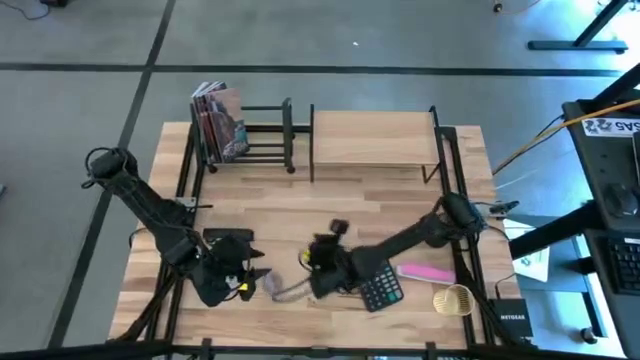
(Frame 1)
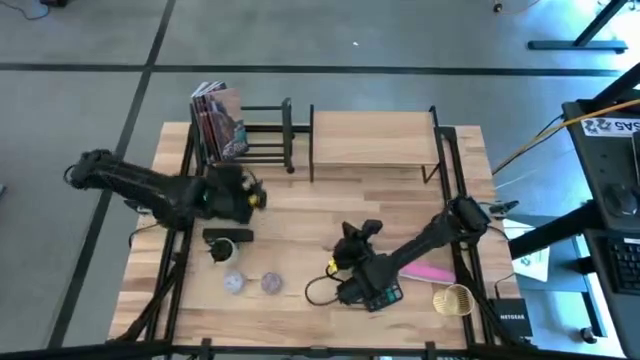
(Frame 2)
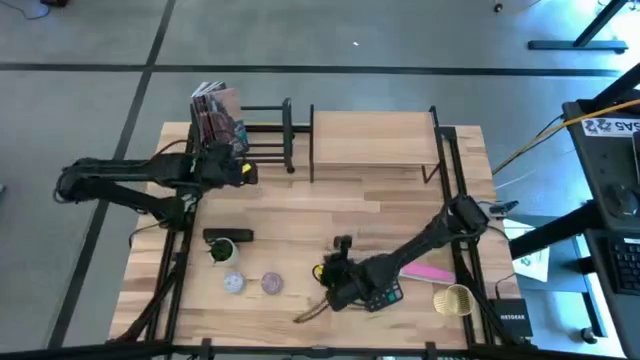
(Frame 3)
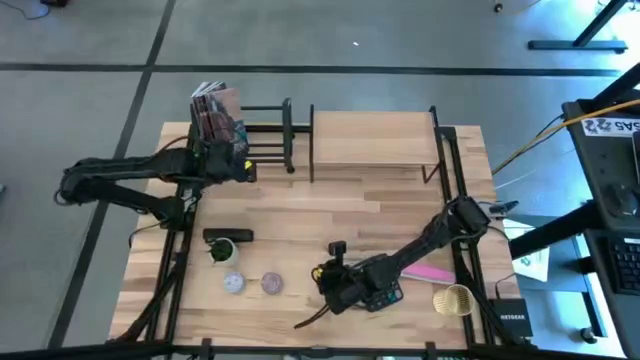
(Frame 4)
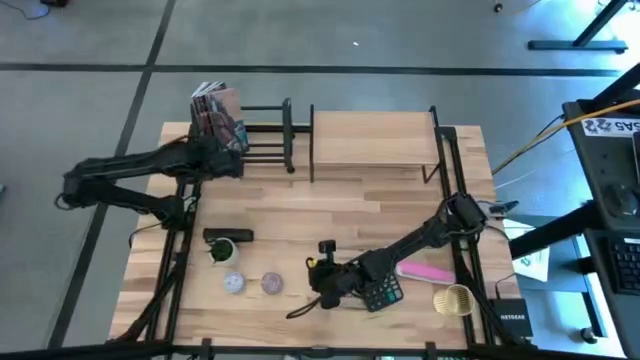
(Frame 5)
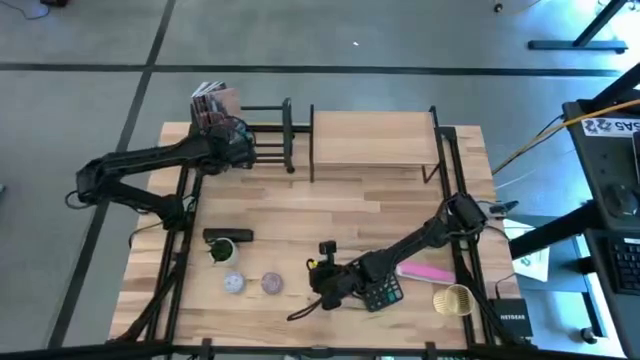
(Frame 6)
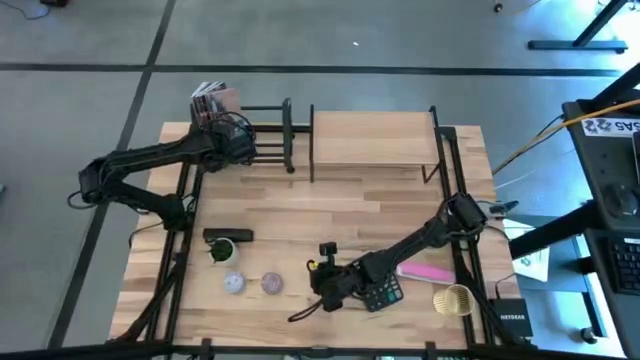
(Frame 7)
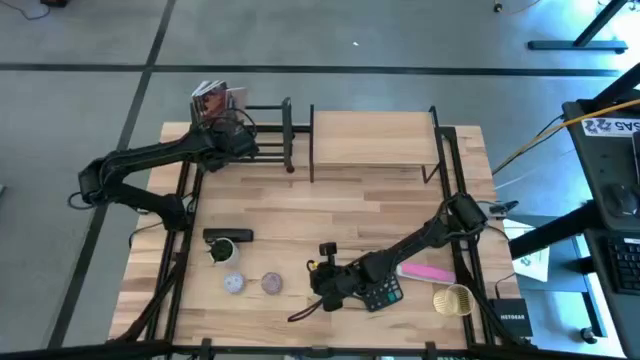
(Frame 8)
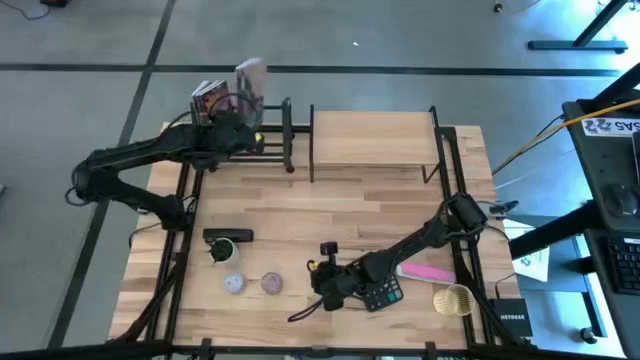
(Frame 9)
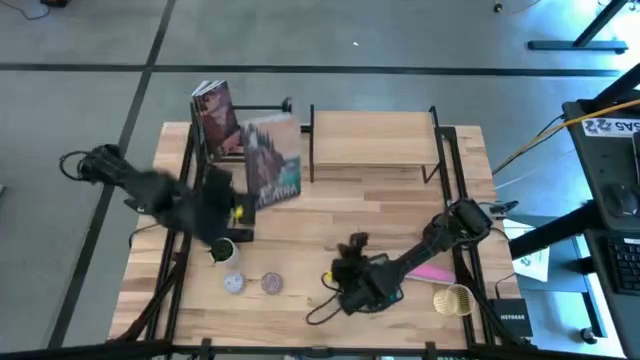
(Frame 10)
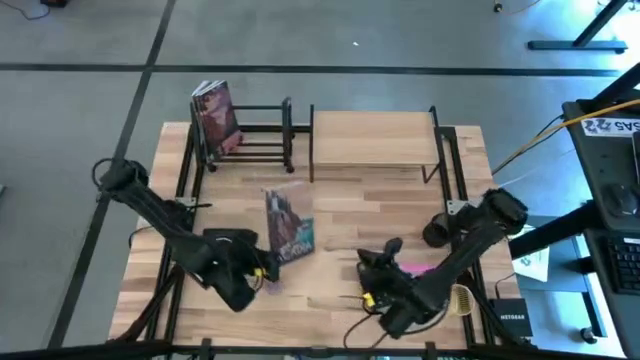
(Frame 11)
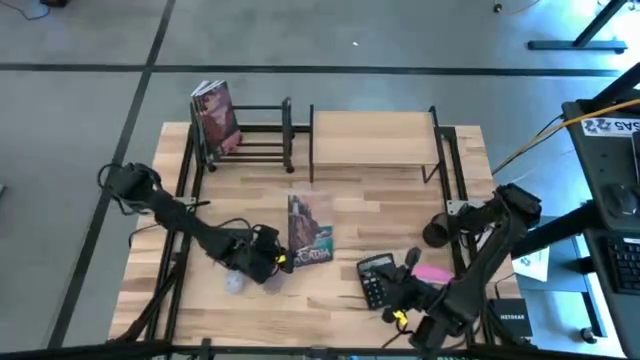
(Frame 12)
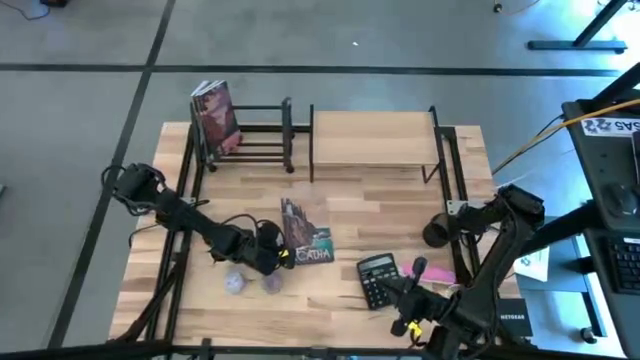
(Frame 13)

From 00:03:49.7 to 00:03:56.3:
Task: Stock shelves
Remove the green book from the bookshelf

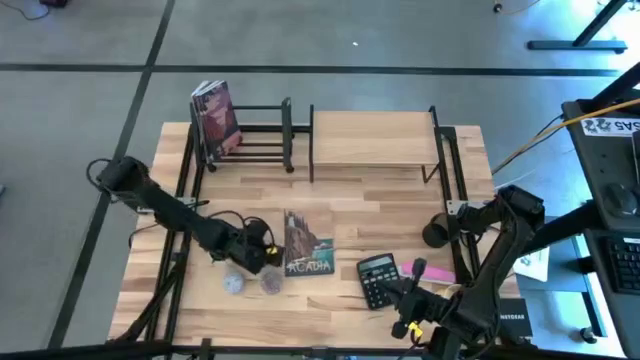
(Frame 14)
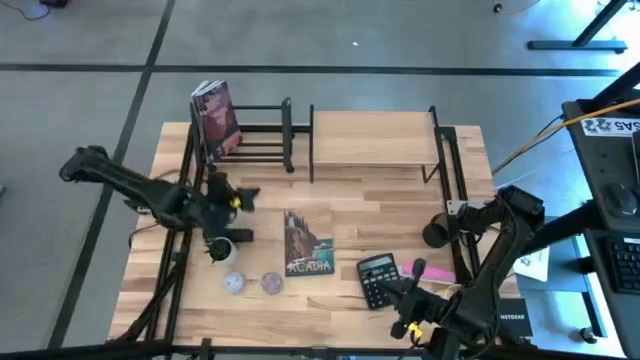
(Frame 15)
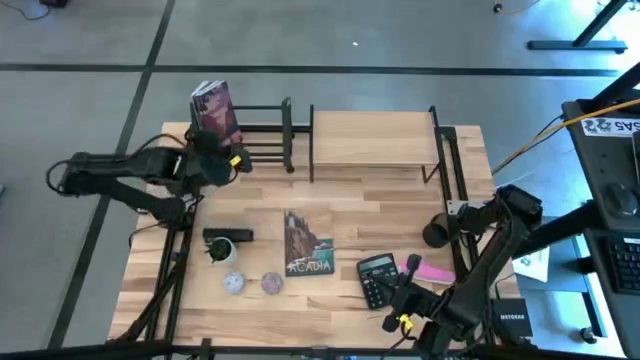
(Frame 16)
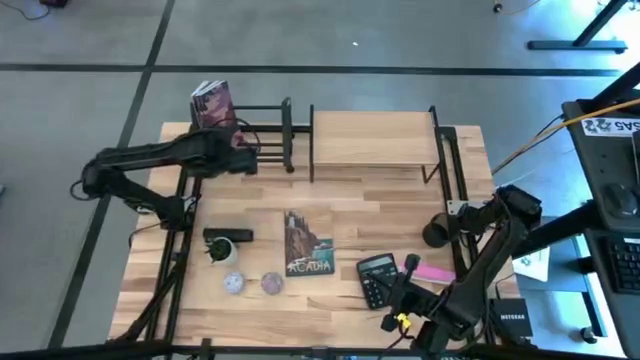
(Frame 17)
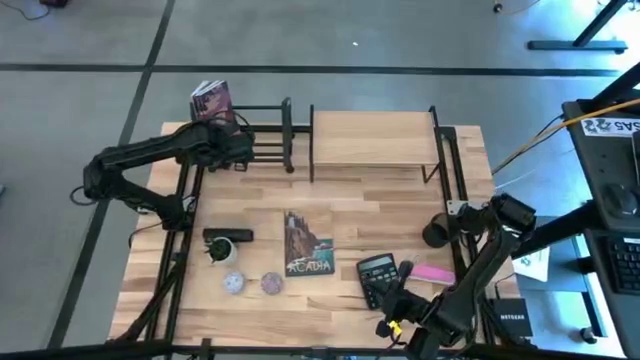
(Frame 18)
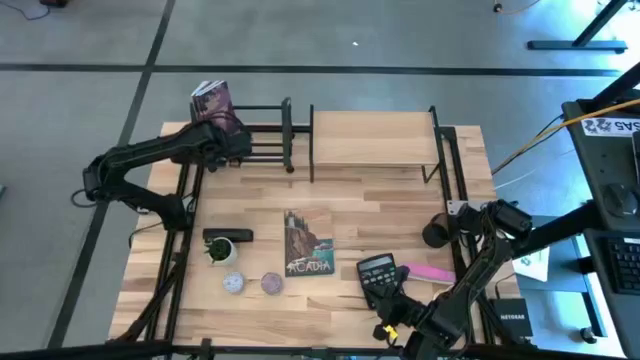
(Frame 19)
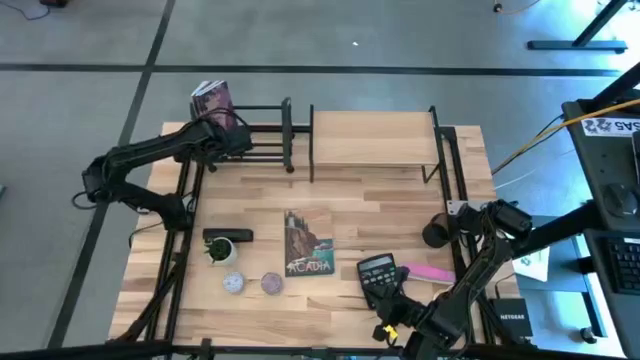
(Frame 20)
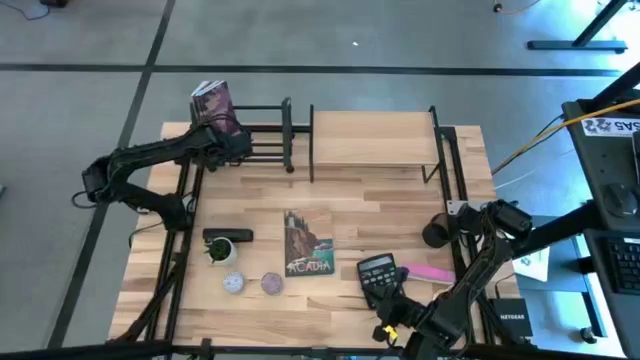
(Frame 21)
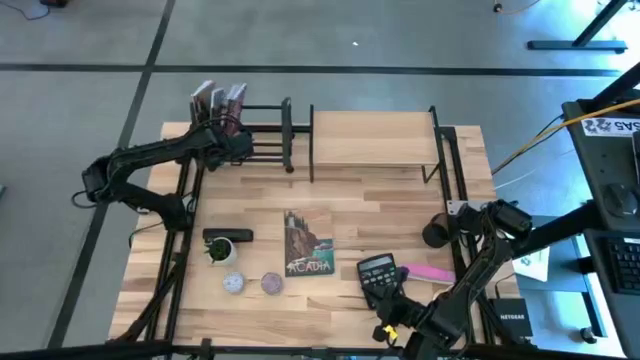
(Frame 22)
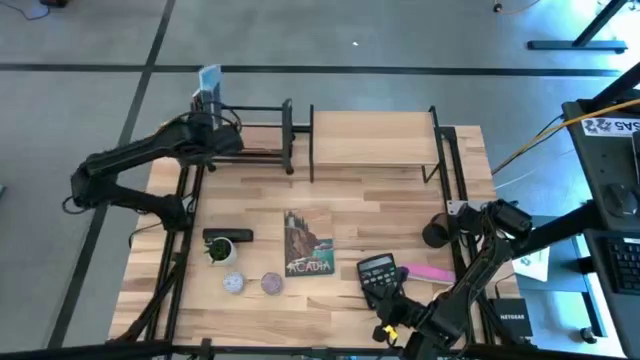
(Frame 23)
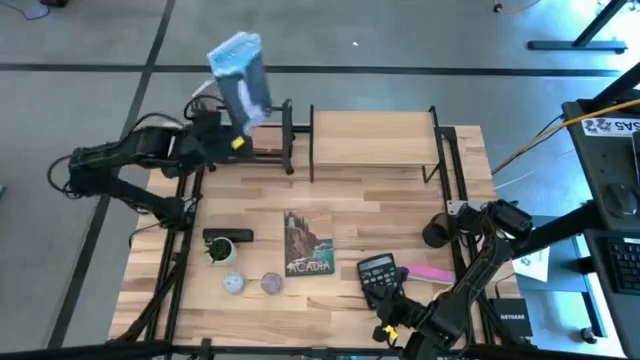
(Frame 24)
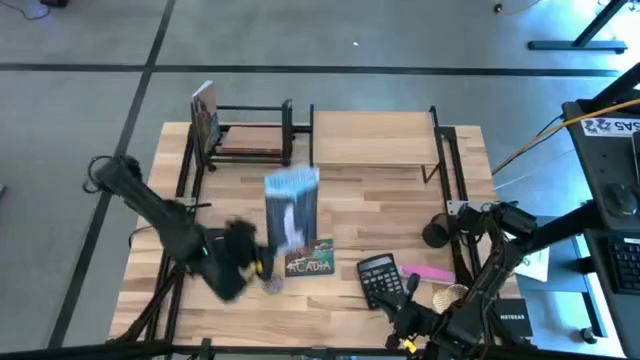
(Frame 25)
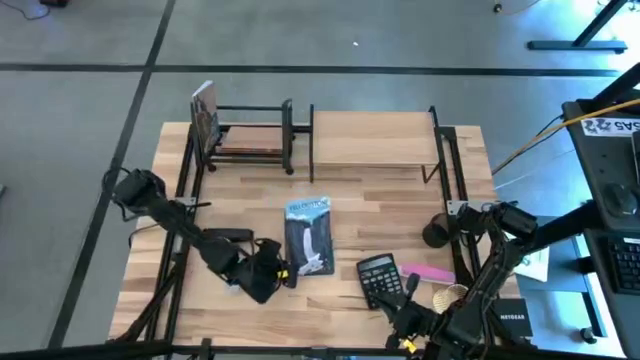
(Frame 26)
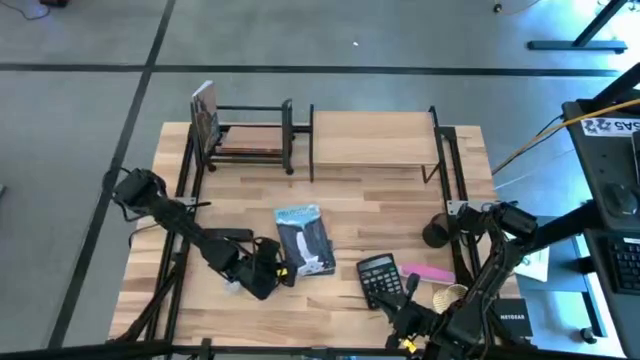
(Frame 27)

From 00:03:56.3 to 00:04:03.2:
Remove the blue book from the bookshelf

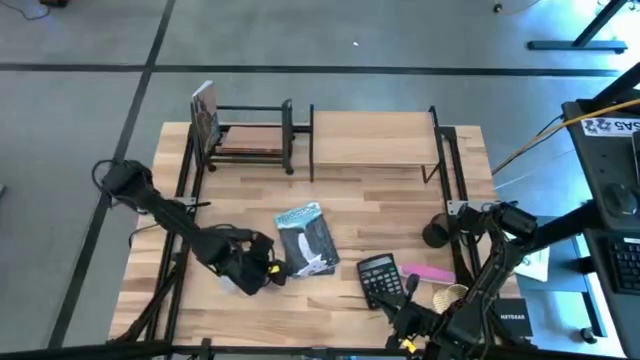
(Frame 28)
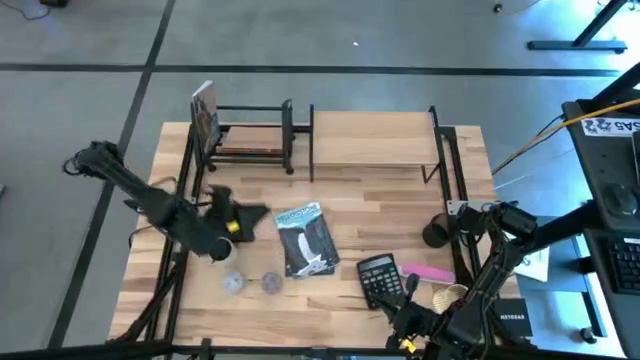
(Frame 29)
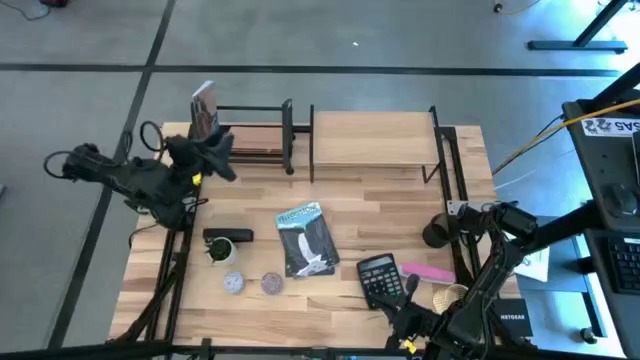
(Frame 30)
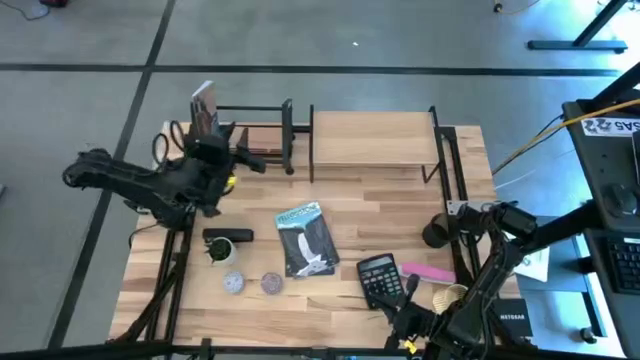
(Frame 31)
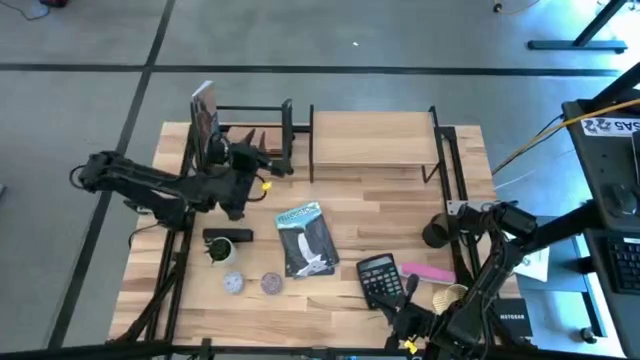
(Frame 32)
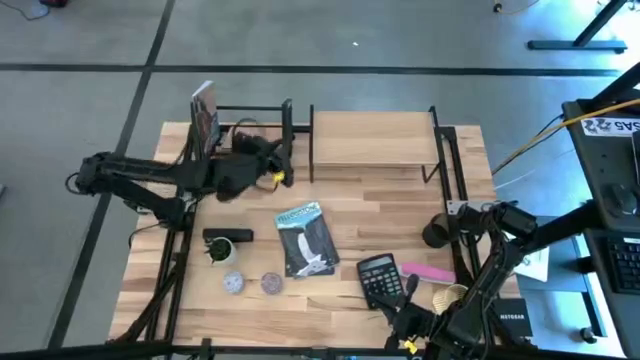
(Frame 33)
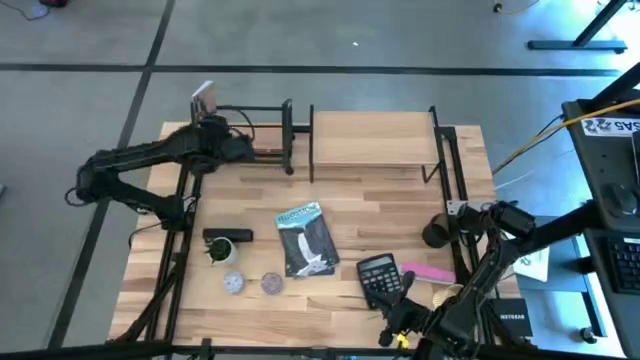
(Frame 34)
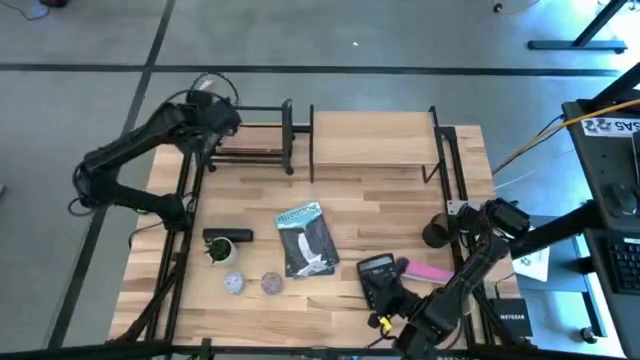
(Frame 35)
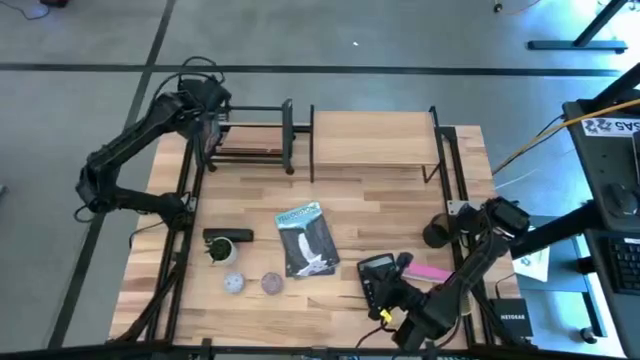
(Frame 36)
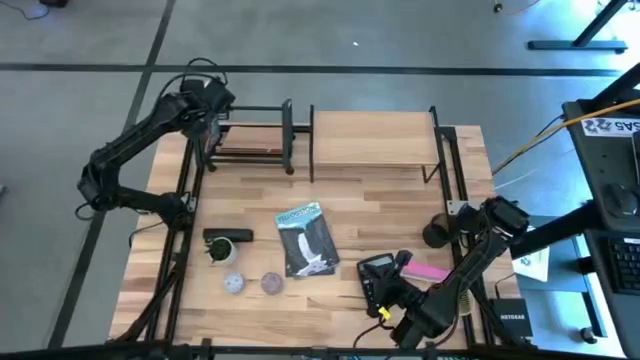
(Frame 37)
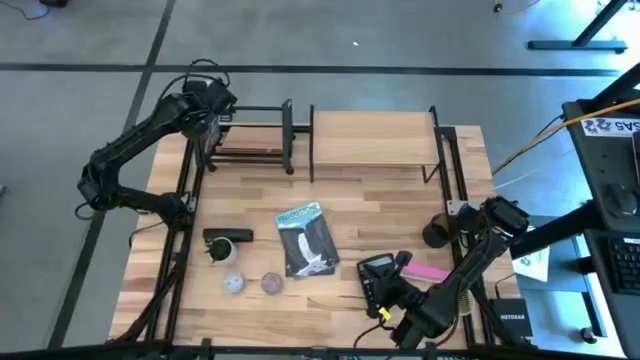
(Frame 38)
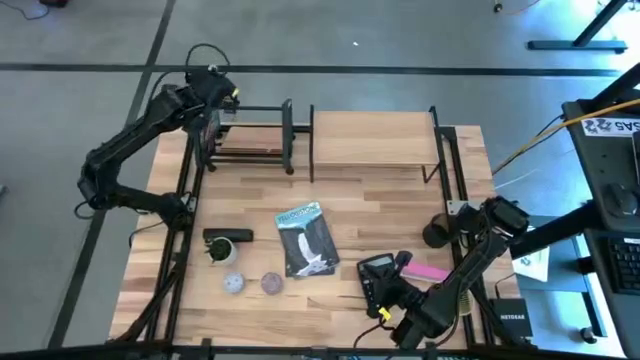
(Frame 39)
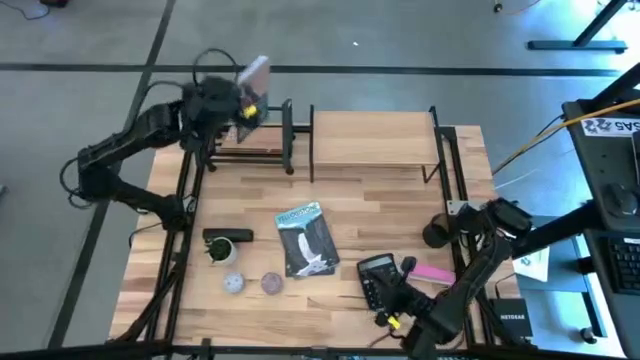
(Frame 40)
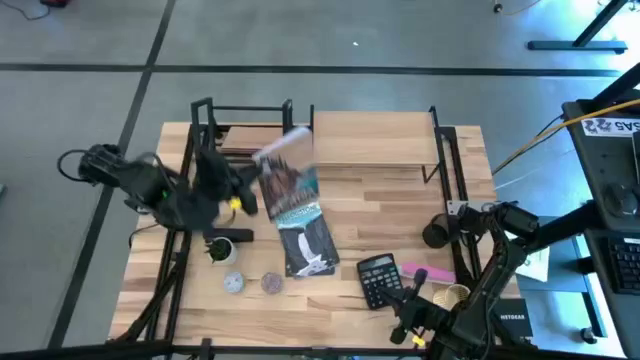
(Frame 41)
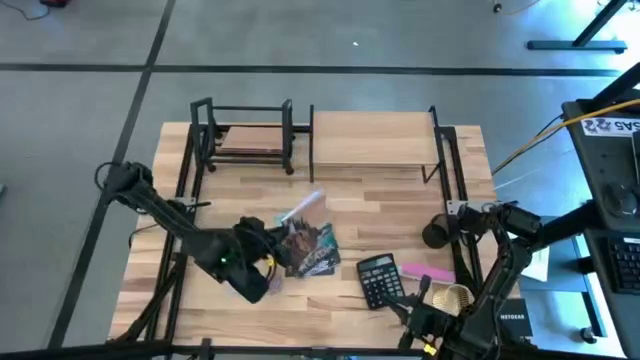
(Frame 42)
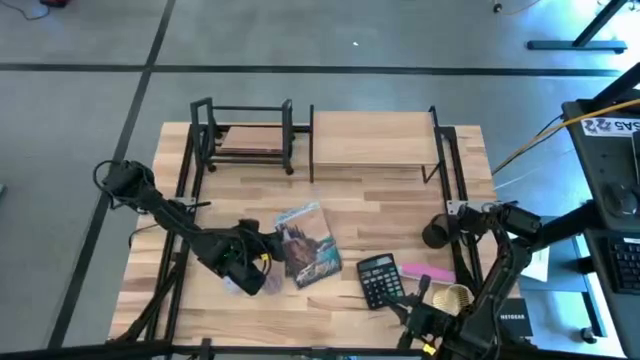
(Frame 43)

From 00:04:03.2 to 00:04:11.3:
Remove the brown book from the bookshelf
